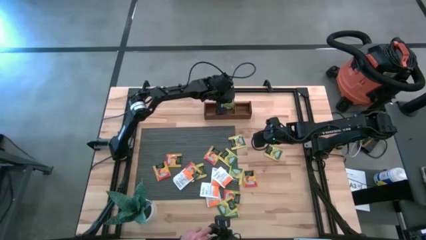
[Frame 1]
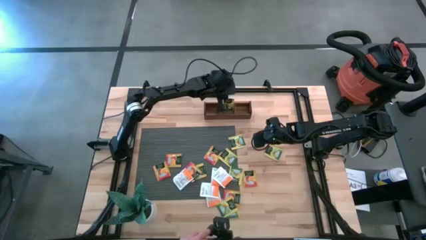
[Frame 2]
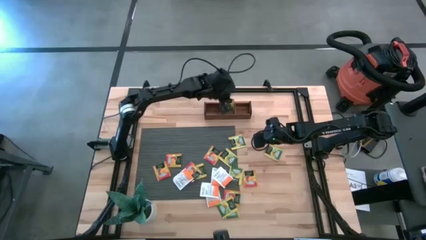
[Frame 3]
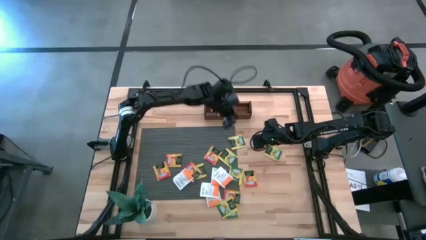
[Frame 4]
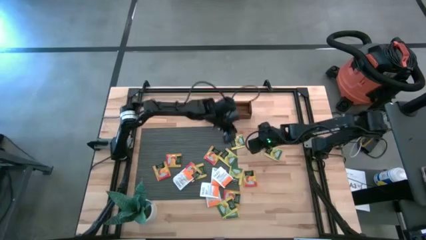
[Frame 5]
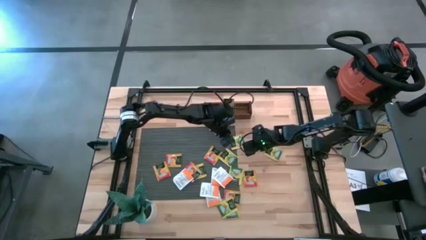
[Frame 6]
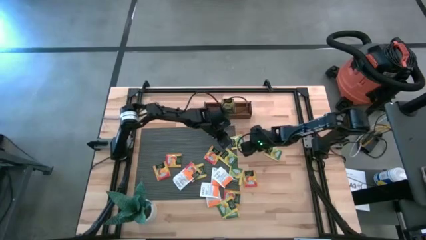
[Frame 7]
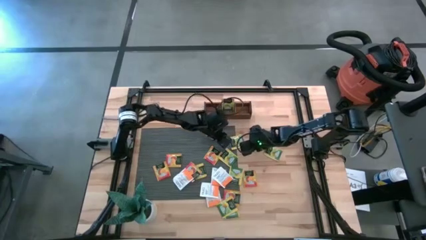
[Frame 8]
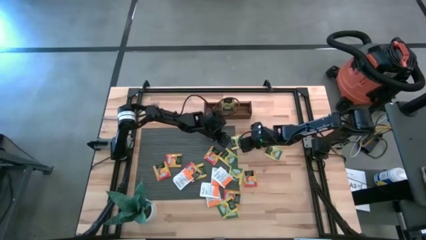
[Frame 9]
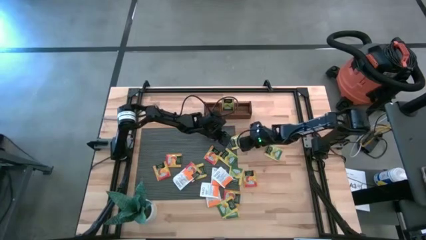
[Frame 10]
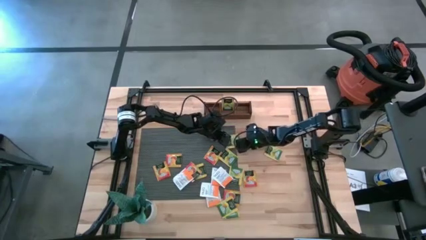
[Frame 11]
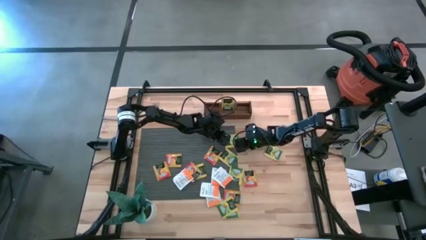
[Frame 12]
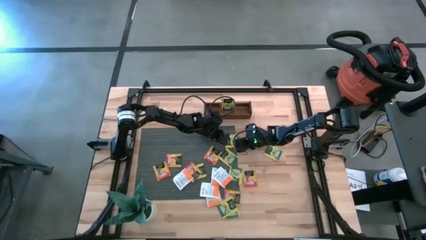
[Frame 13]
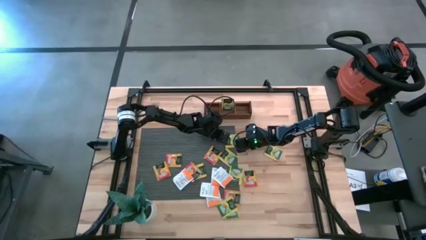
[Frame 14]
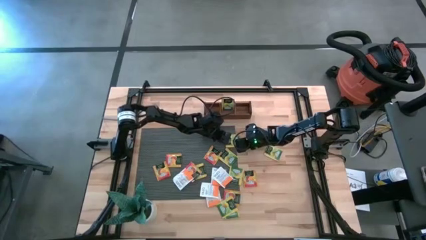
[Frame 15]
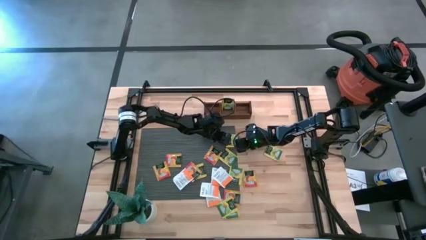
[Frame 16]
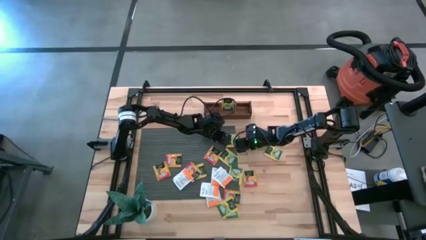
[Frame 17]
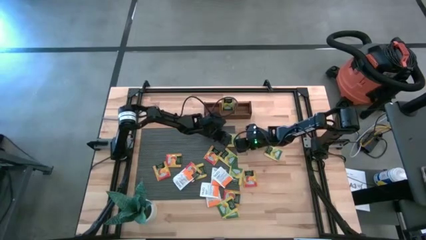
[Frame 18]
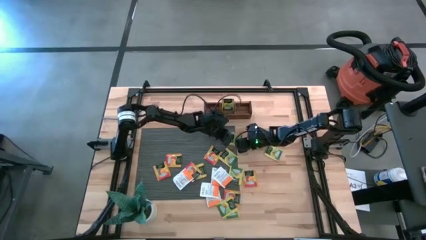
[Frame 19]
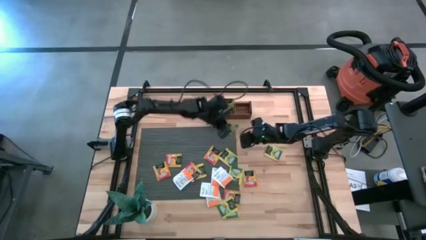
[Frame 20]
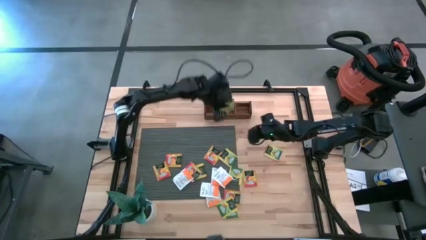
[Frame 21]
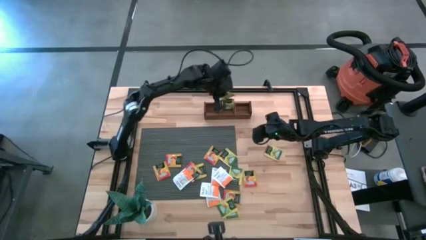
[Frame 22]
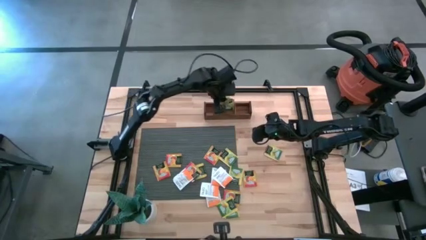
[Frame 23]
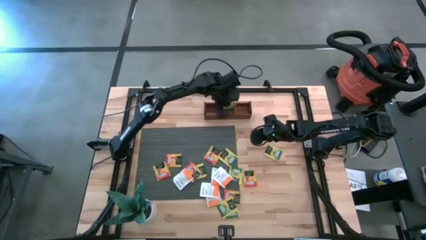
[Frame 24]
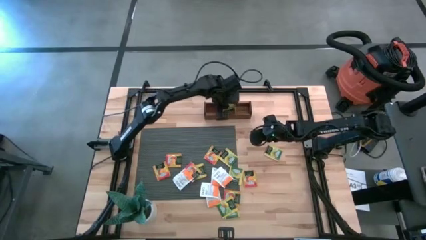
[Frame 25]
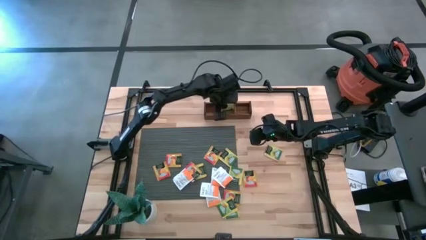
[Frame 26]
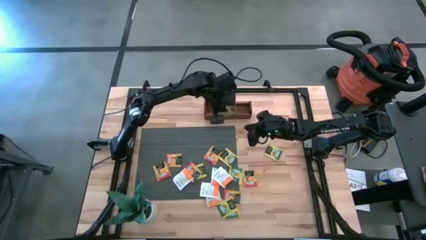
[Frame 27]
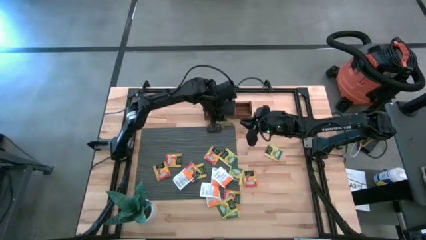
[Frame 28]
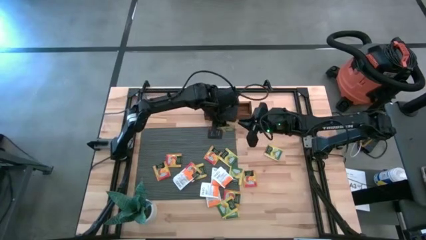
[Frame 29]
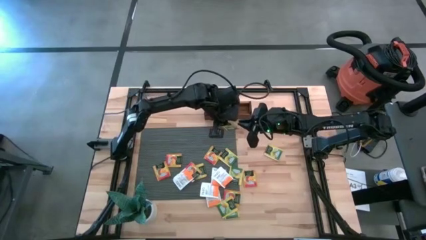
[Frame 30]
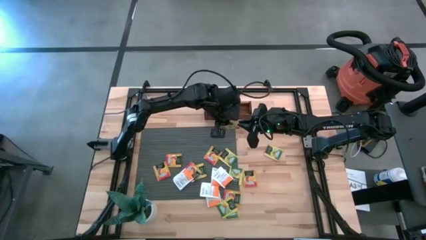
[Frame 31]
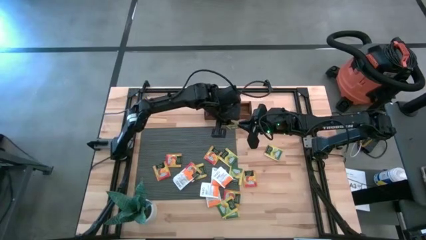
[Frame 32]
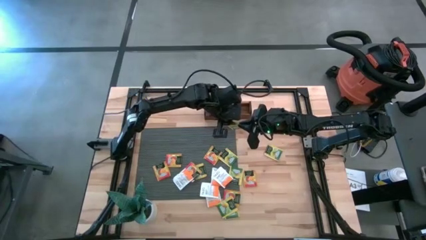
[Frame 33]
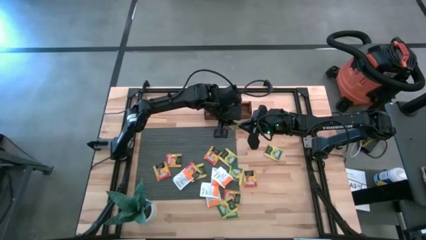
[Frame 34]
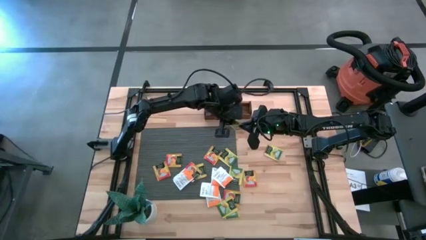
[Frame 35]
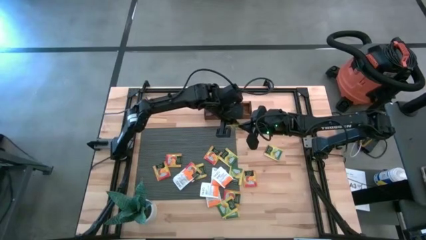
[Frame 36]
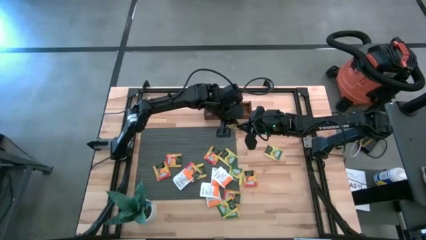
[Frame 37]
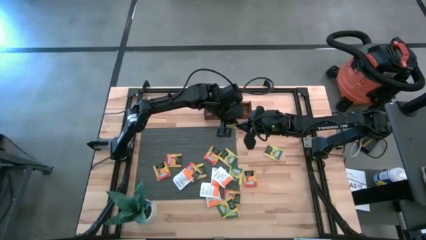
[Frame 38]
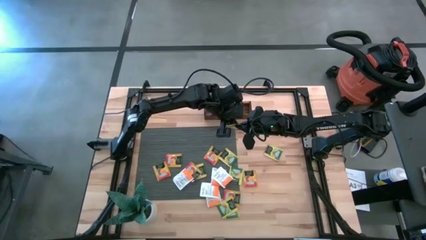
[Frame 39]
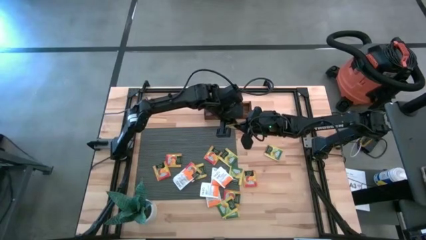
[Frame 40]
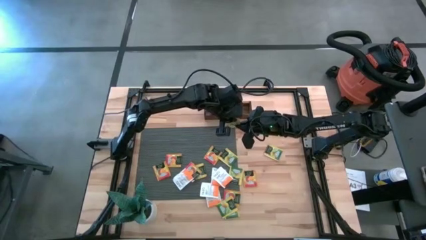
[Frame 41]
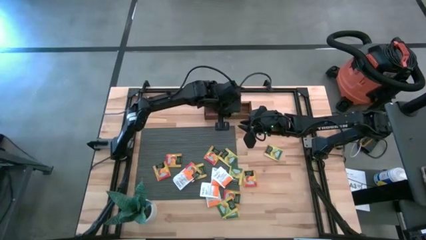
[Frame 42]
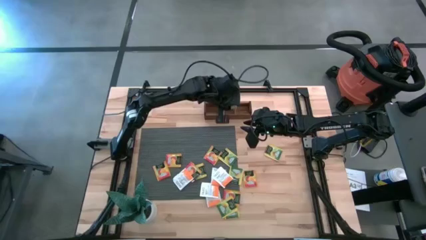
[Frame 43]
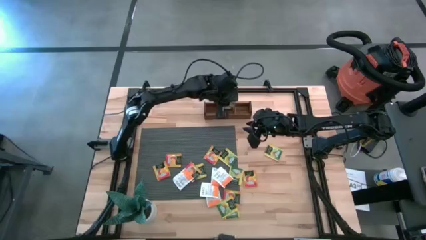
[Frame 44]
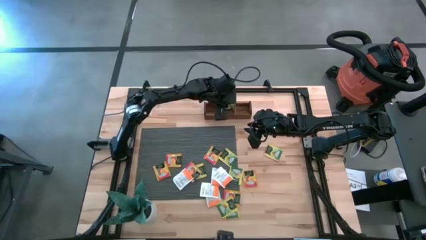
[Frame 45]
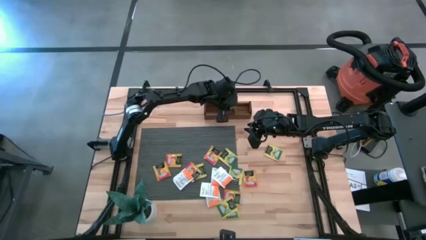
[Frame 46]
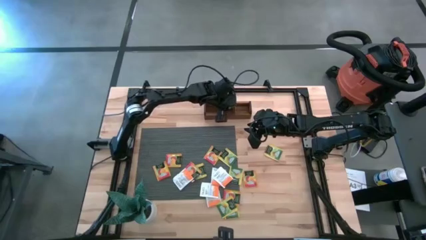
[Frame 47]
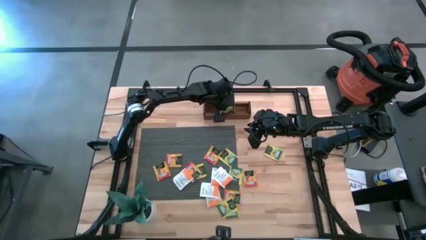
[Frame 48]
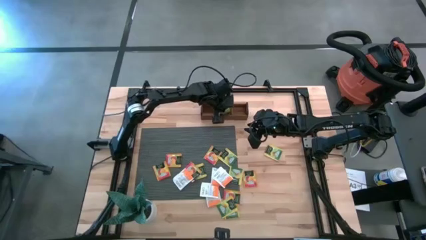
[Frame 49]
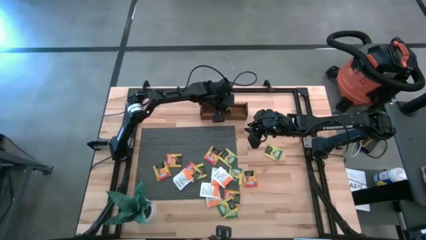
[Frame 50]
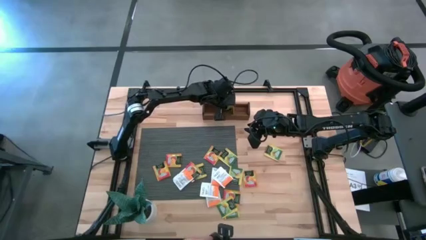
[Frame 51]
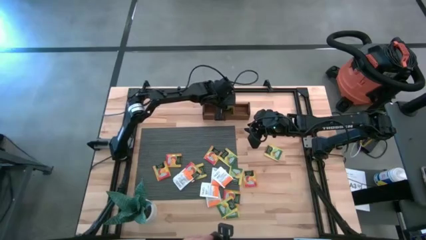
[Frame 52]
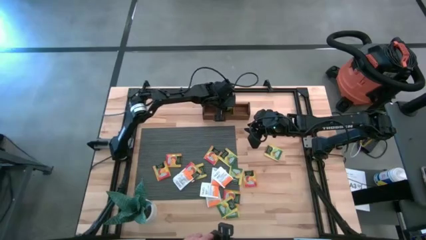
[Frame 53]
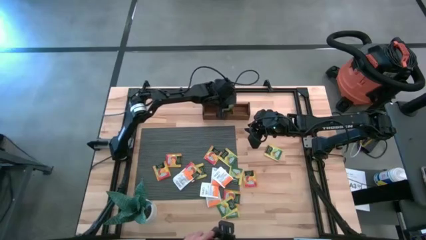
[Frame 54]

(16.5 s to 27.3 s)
Task: Pick & Place Tea
Put the yellow tea bag into the middle section of the wooden organizer

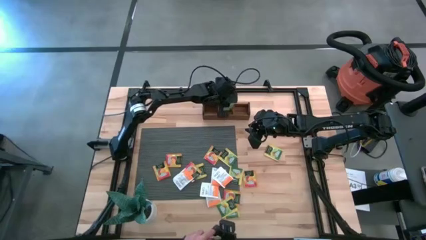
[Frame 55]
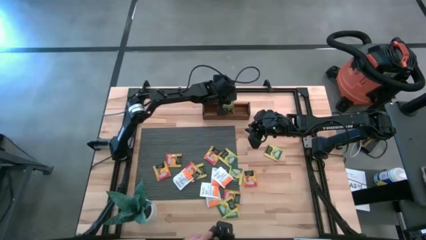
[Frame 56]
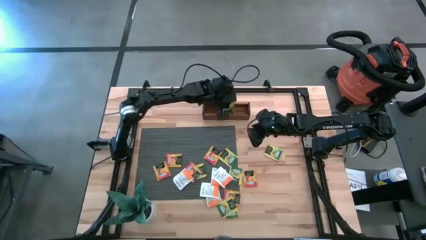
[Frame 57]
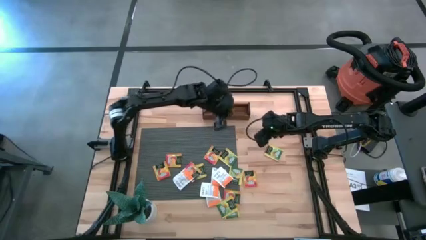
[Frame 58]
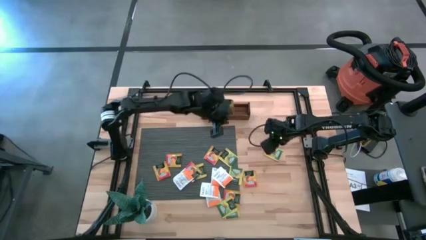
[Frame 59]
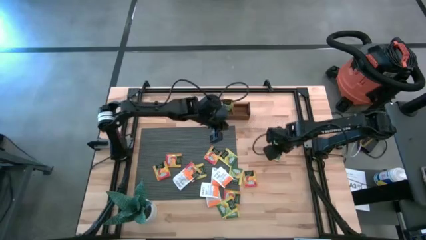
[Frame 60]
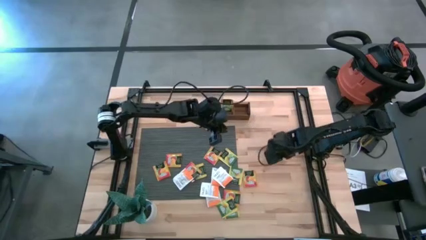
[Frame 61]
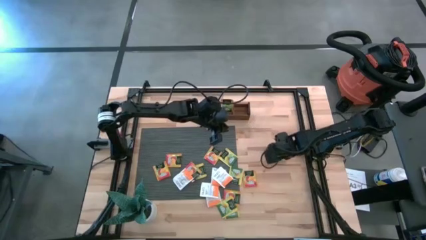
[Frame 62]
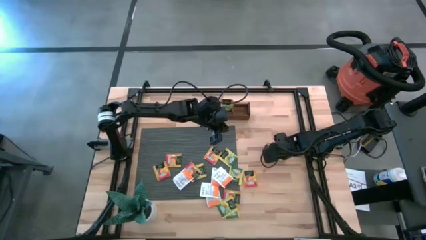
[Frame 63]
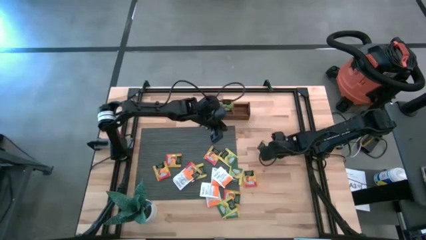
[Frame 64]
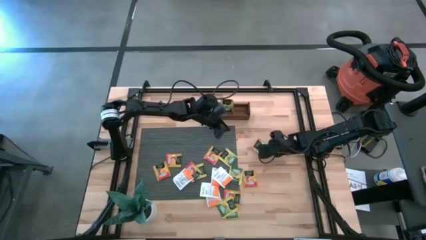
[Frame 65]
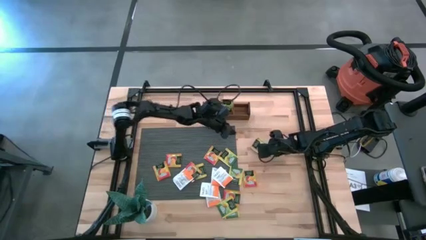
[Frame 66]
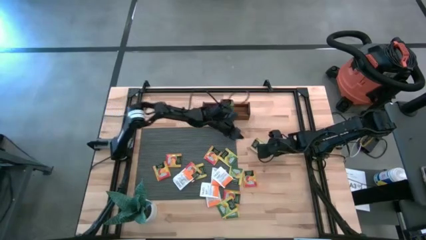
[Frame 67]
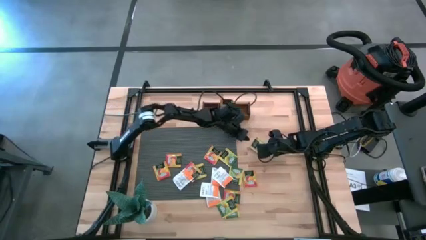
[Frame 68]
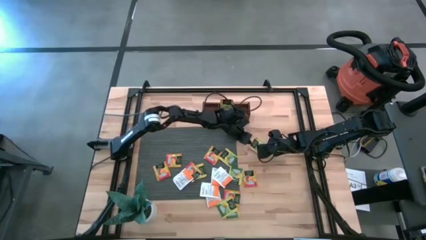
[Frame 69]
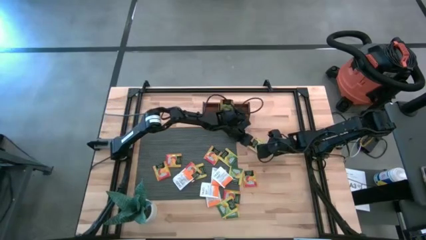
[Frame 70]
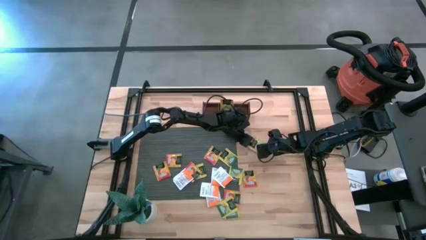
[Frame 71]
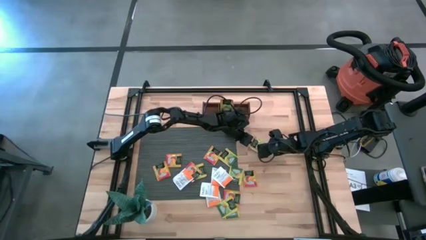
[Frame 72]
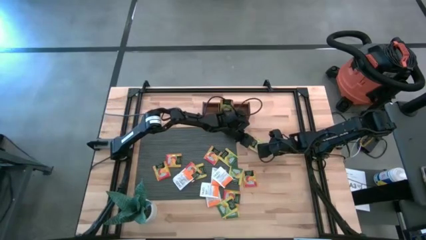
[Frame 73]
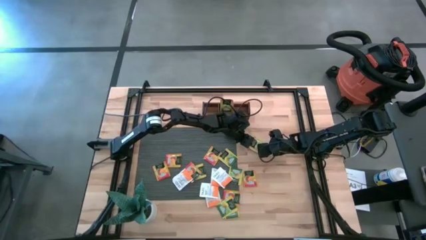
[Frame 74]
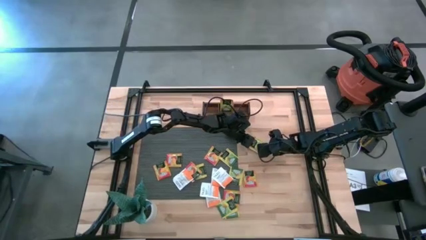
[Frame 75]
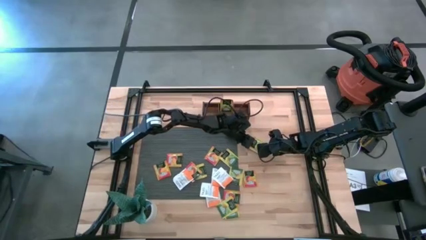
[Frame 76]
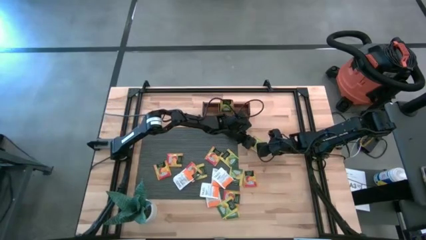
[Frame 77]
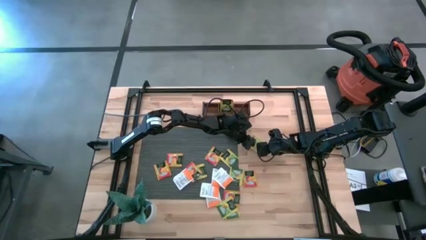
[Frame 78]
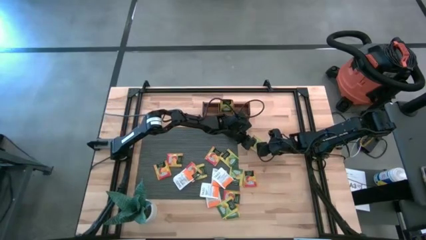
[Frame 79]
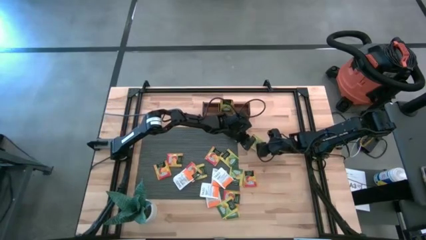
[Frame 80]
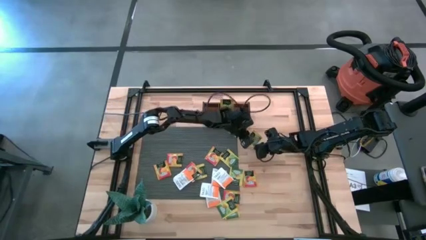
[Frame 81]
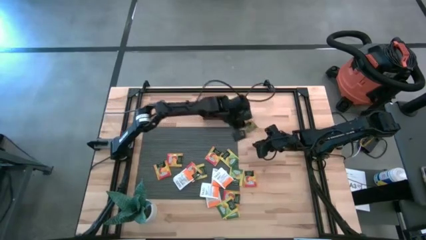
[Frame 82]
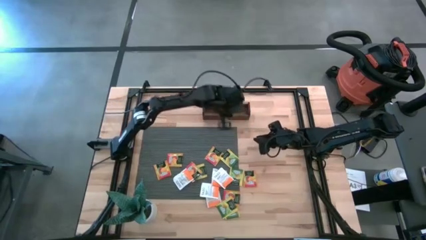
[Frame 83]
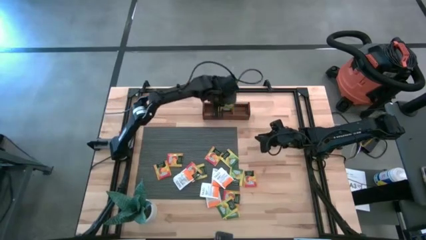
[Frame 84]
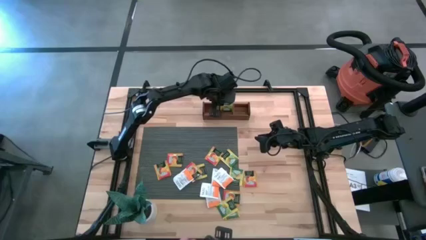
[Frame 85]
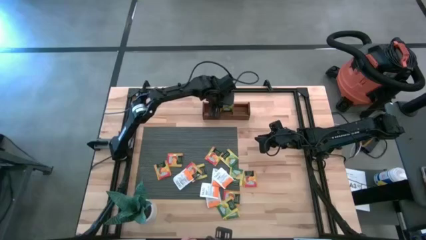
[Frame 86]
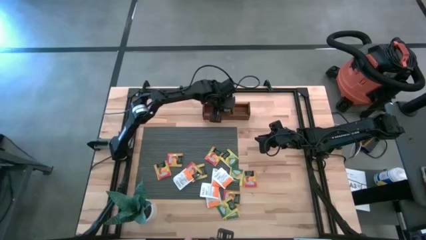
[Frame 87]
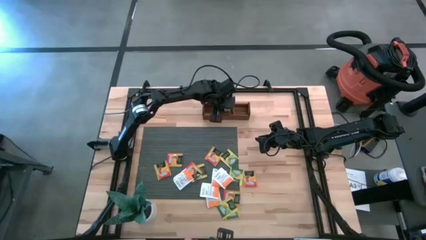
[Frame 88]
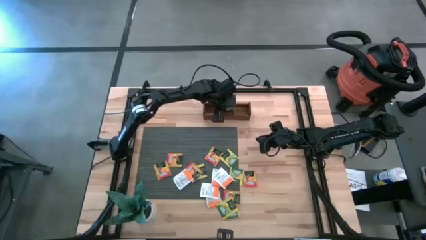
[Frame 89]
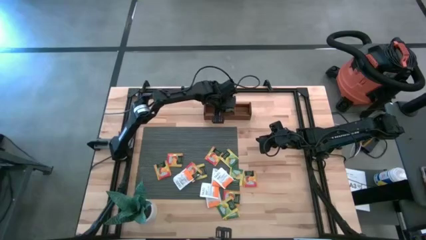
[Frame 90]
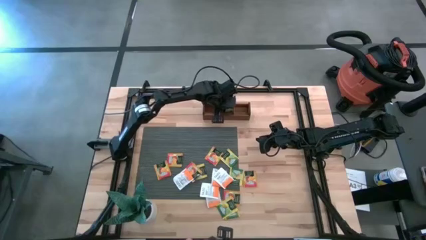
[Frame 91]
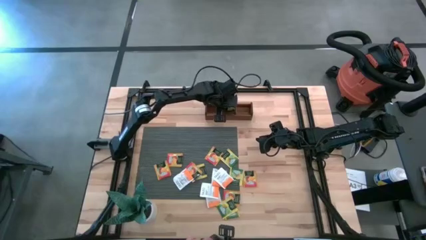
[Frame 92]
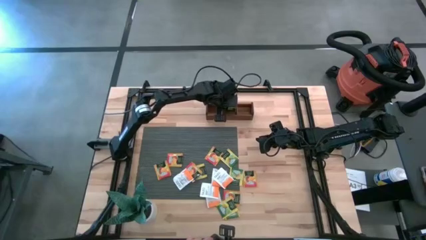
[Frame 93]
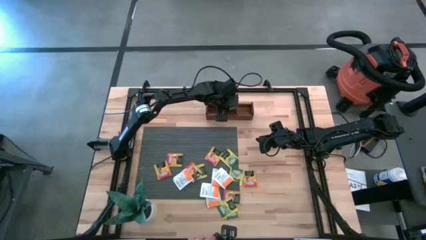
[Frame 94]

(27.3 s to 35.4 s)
Put the yellow tea bag into the middle section of the wooden organizer
